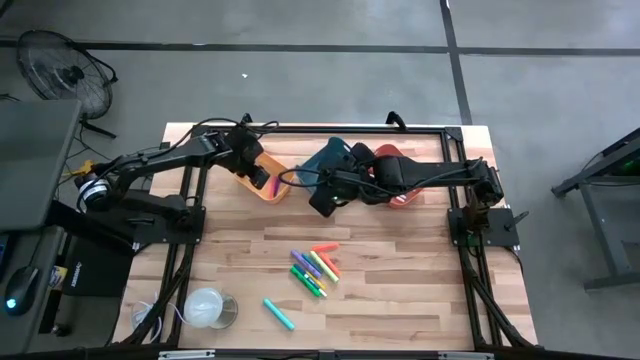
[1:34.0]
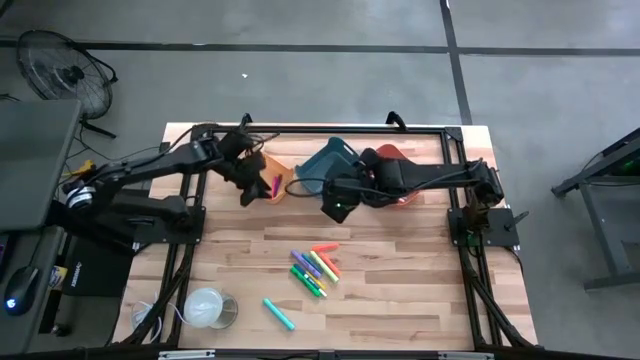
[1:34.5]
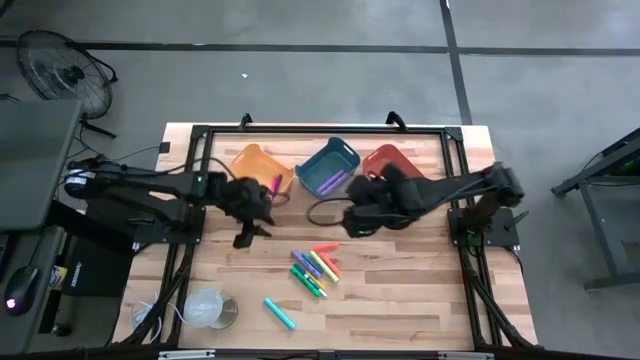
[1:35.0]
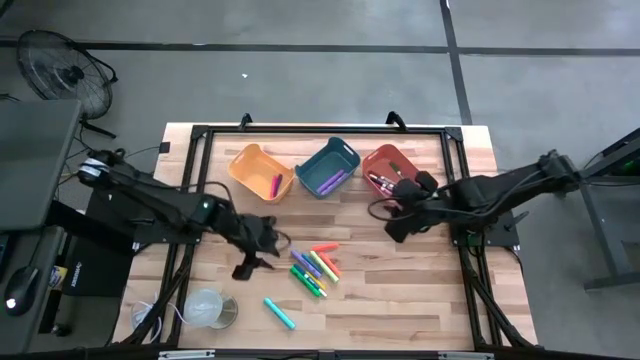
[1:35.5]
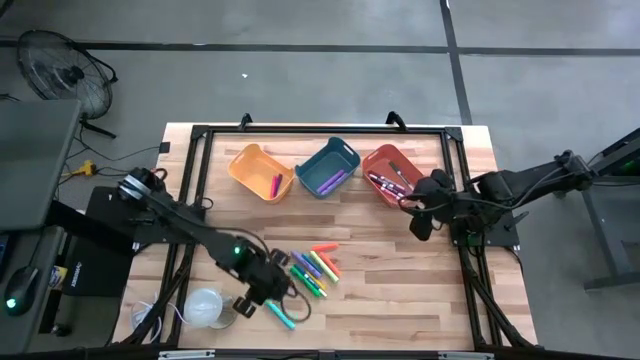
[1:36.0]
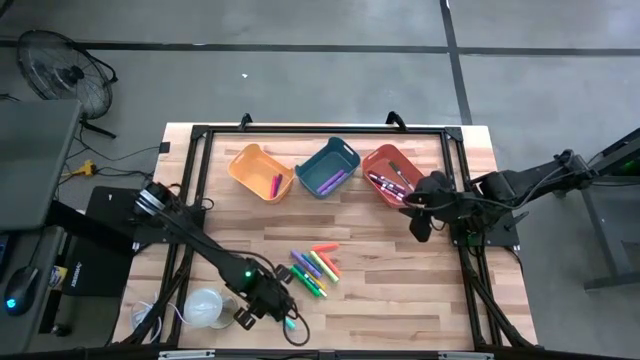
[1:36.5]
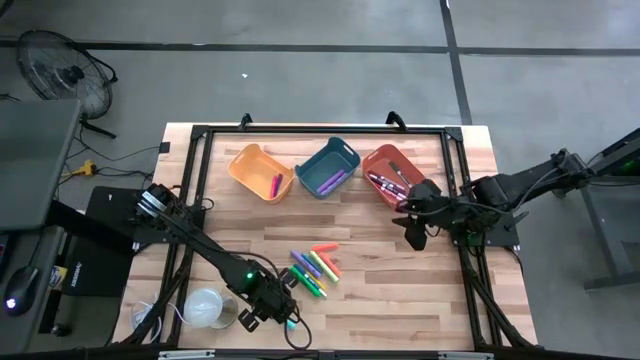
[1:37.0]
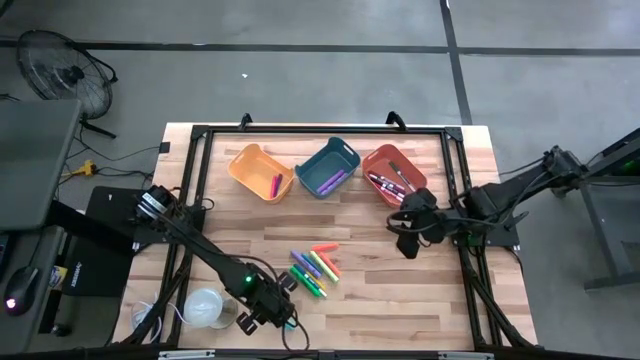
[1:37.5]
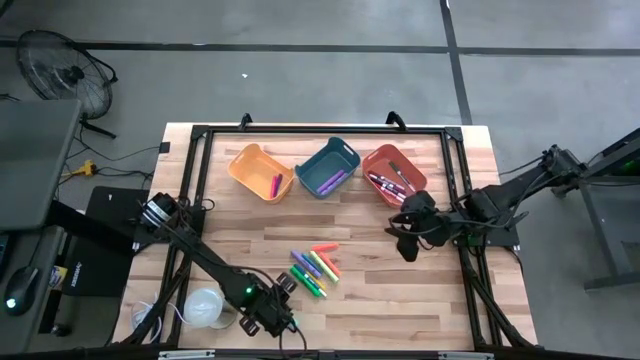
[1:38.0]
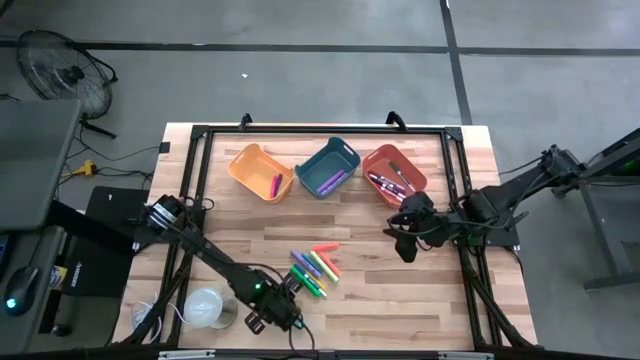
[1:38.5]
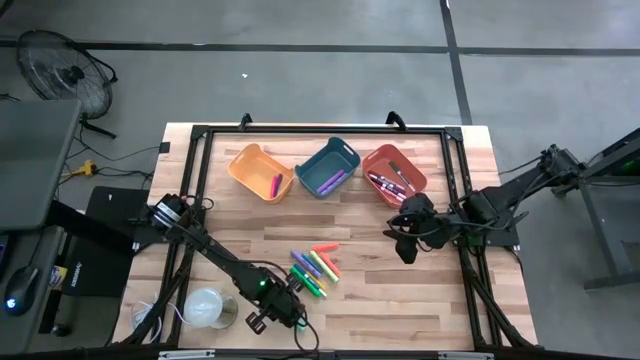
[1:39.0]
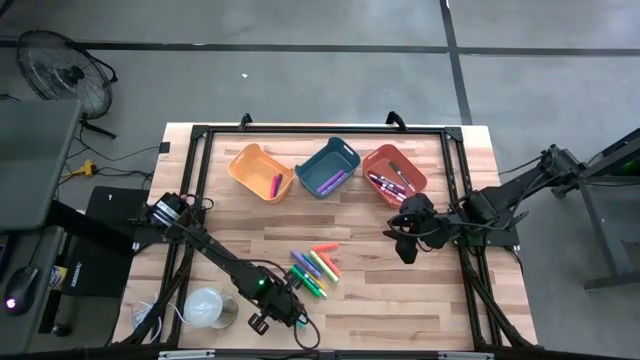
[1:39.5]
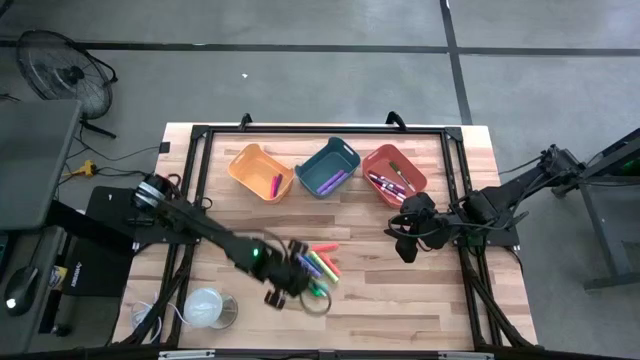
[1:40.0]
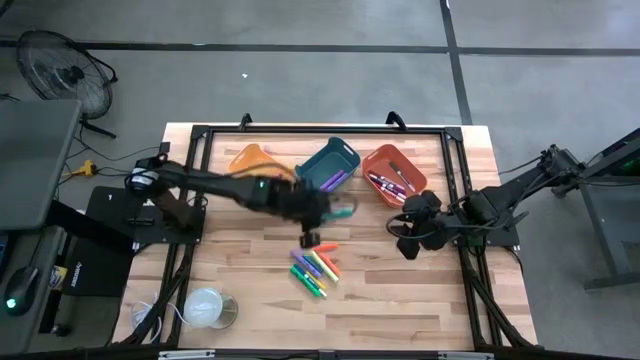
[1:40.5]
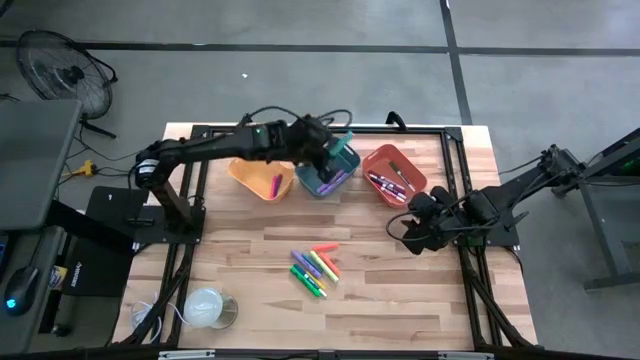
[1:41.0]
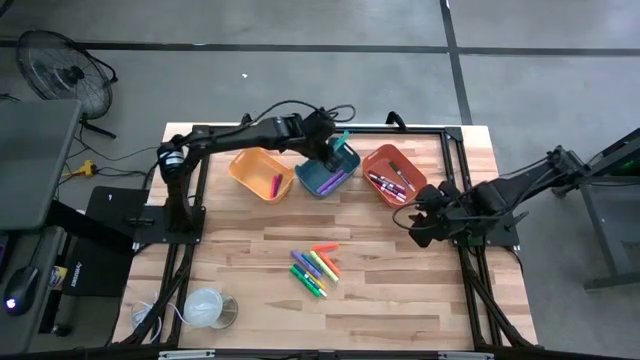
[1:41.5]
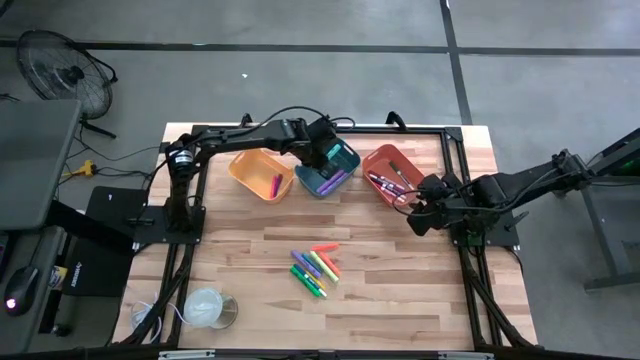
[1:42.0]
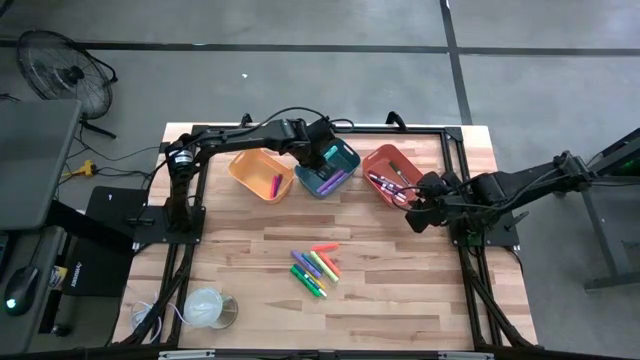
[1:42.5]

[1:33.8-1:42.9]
Task: Pick & Place Markers
Put the blue highlighter pen into the blue bin

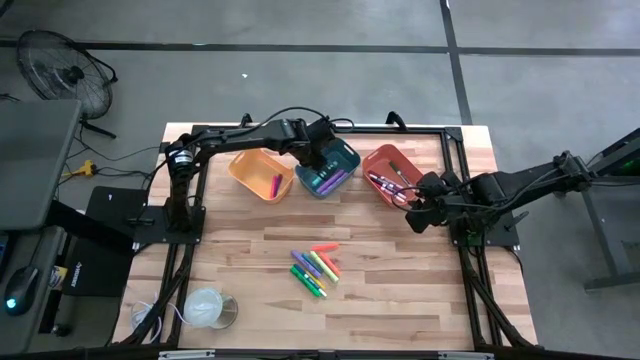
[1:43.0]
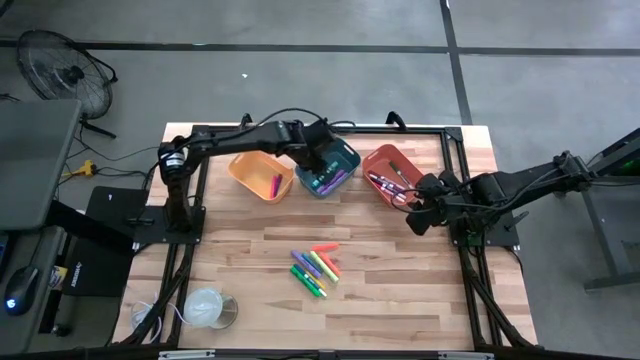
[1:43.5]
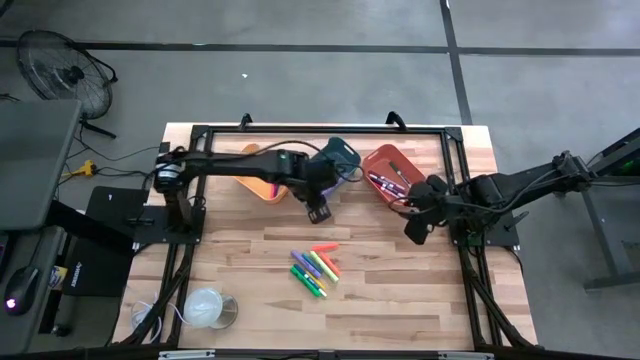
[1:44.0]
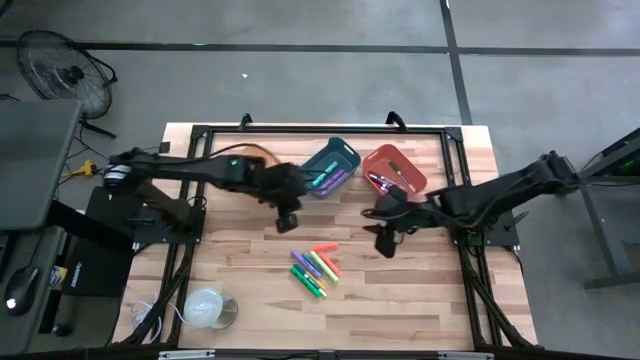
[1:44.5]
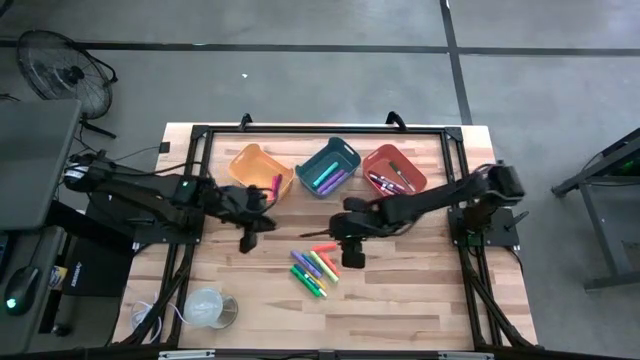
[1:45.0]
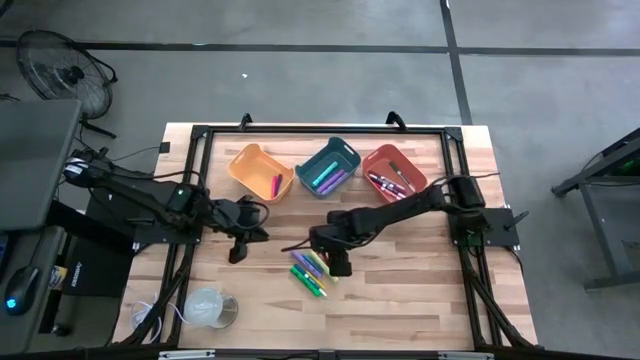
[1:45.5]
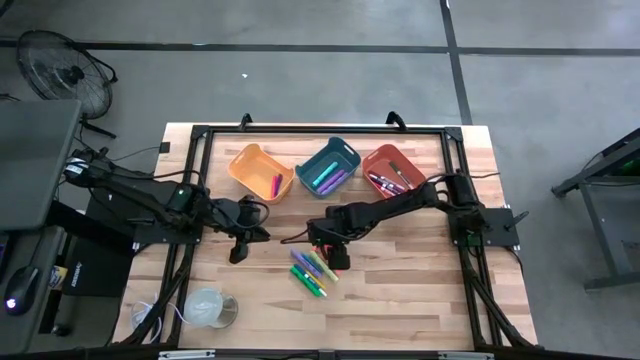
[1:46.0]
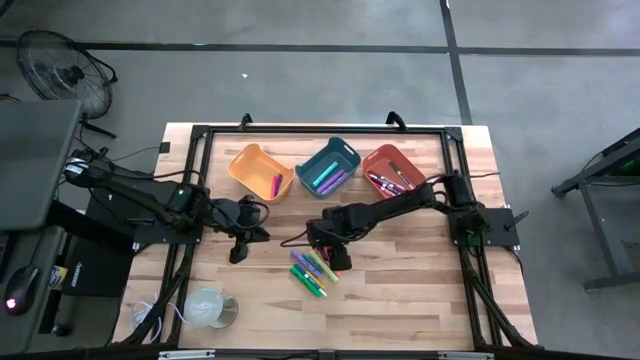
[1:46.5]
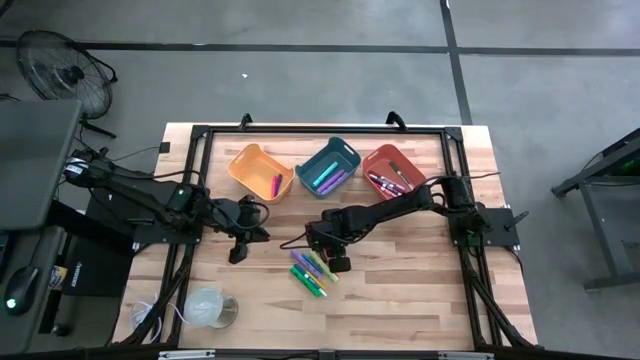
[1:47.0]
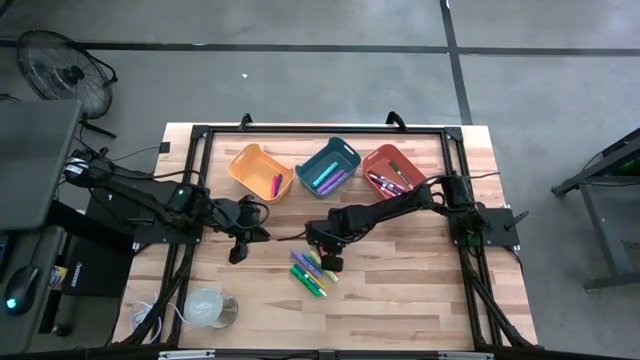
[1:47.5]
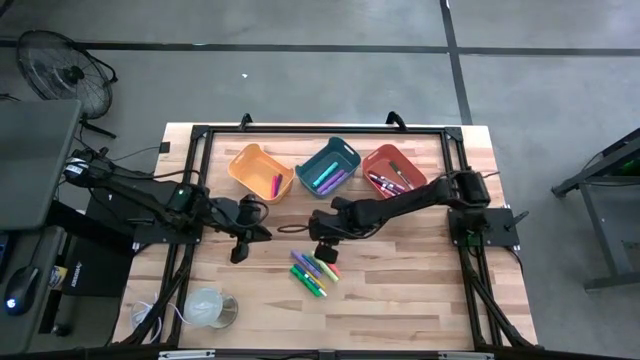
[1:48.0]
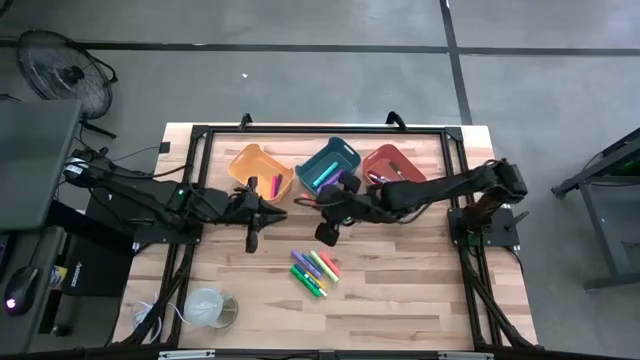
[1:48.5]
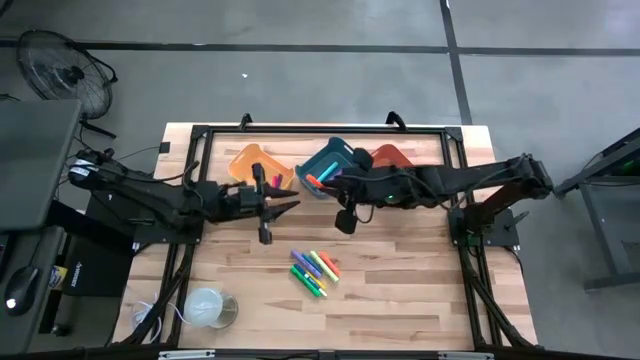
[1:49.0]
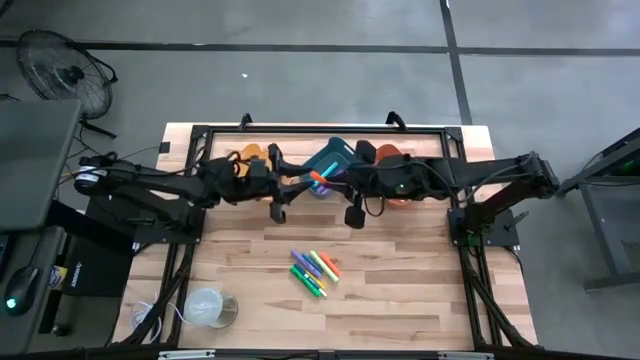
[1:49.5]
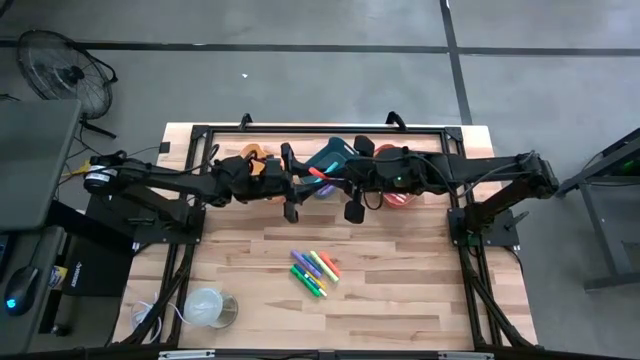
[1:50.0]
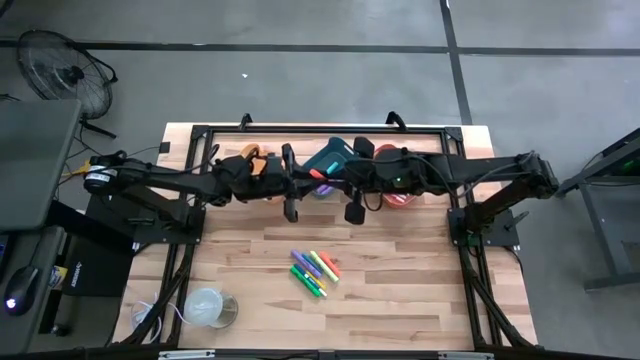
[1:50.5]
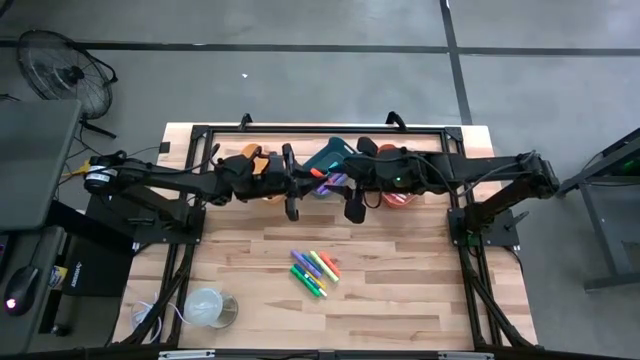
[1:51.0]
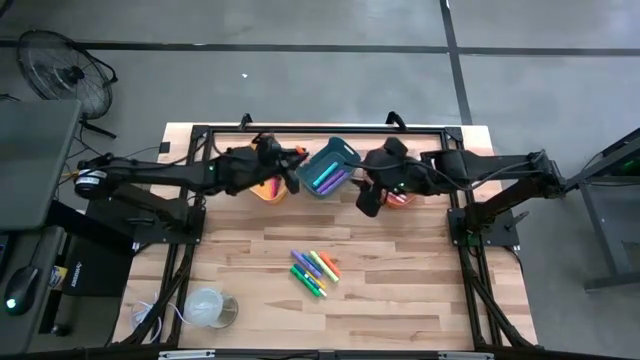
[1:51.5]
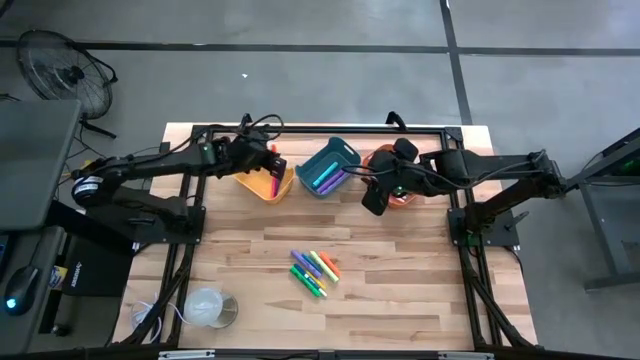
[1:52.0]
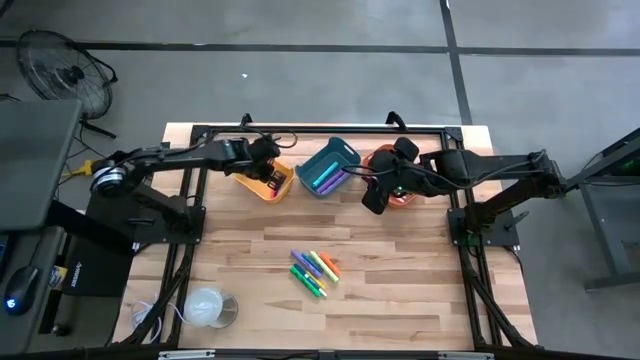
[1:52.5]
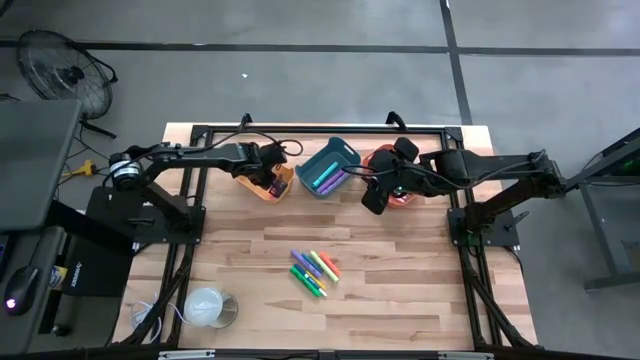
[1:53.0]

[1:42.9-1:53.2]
Put the top orange pen into the yellow bin
